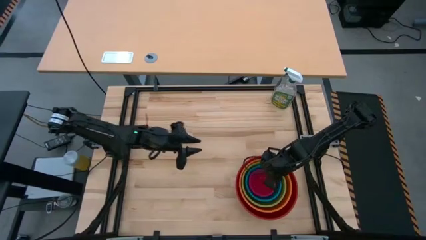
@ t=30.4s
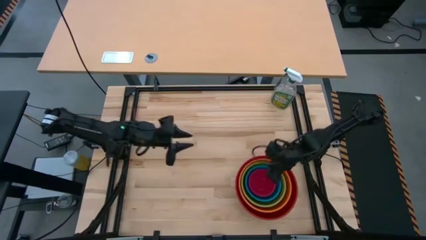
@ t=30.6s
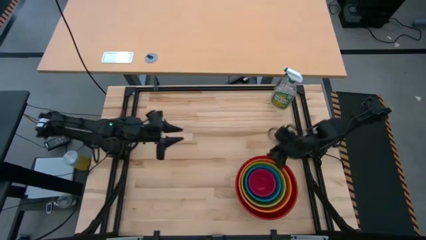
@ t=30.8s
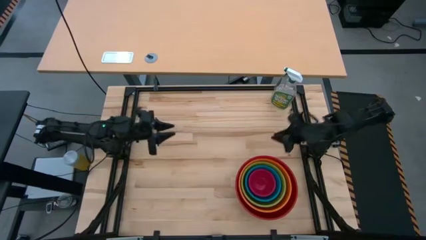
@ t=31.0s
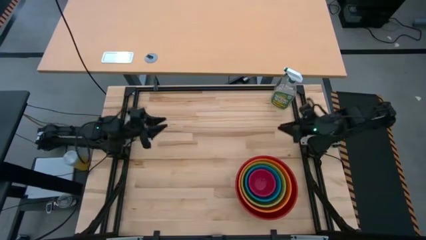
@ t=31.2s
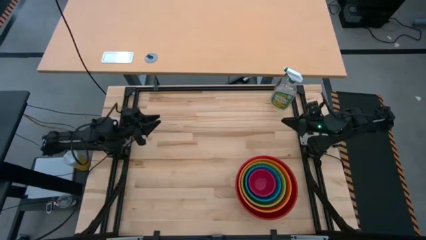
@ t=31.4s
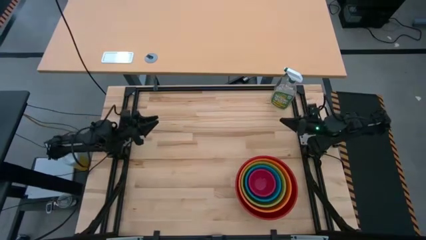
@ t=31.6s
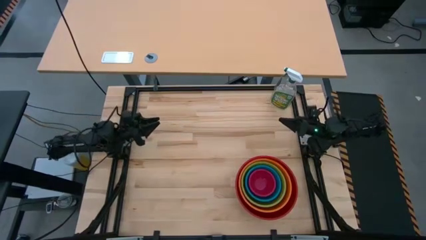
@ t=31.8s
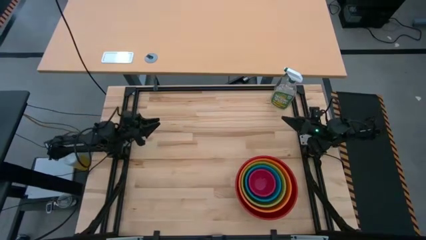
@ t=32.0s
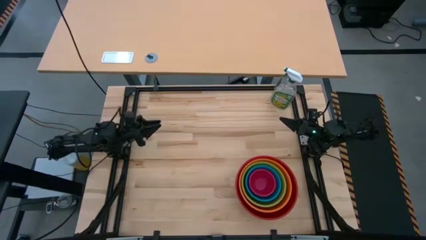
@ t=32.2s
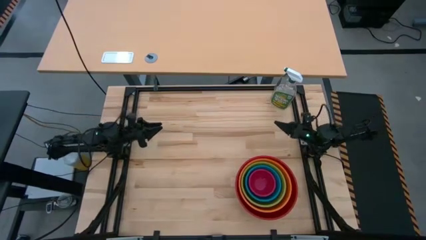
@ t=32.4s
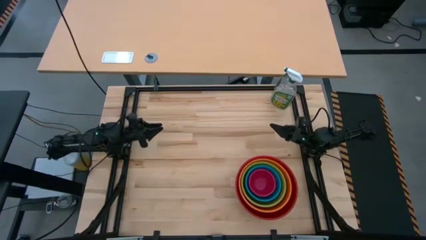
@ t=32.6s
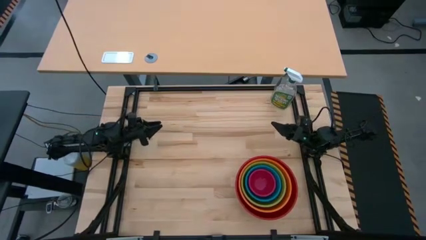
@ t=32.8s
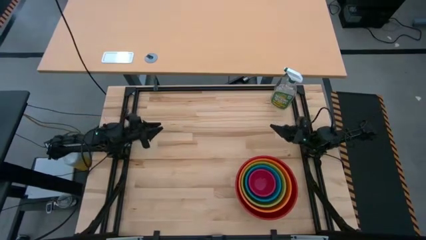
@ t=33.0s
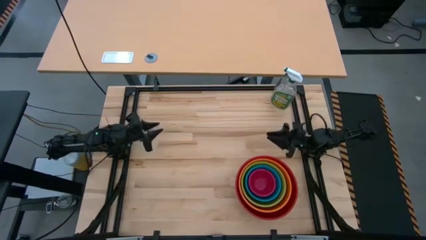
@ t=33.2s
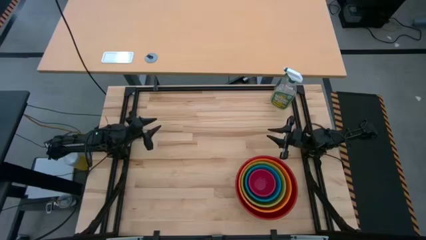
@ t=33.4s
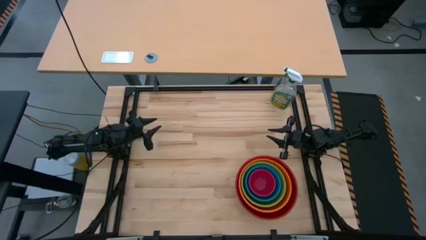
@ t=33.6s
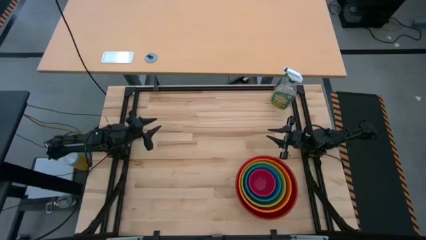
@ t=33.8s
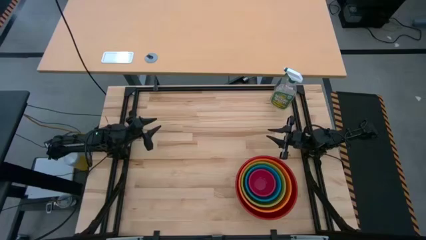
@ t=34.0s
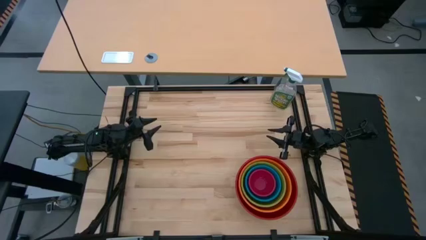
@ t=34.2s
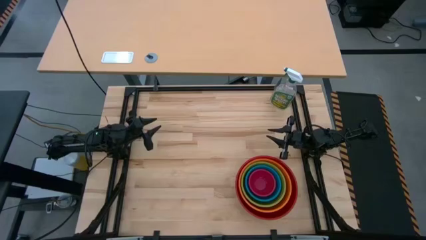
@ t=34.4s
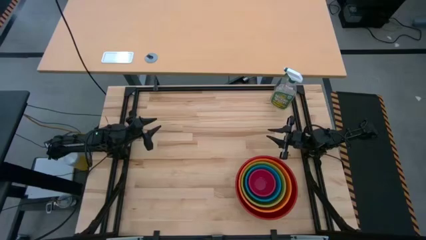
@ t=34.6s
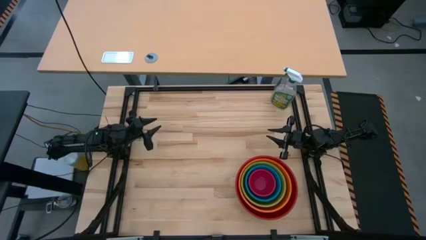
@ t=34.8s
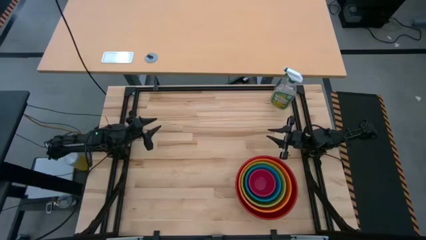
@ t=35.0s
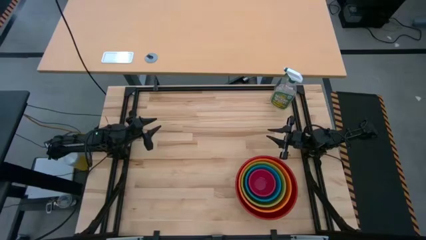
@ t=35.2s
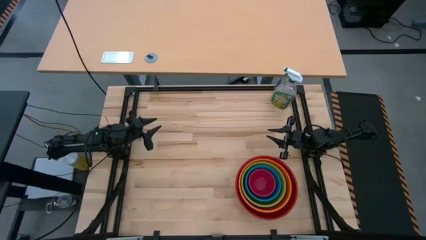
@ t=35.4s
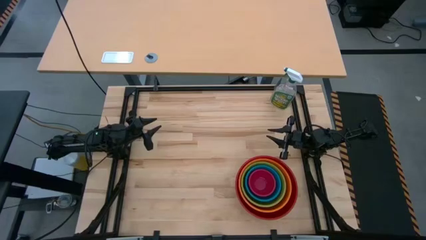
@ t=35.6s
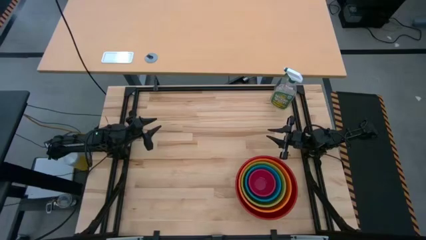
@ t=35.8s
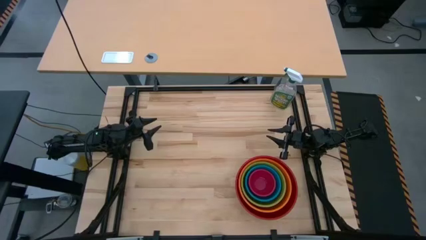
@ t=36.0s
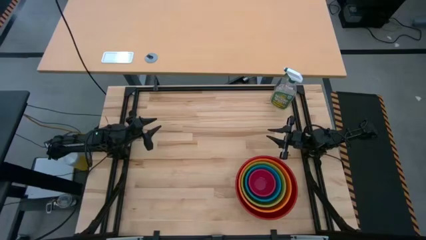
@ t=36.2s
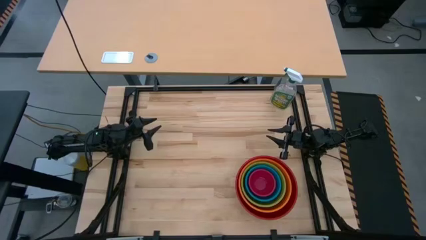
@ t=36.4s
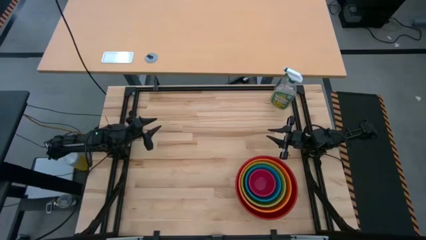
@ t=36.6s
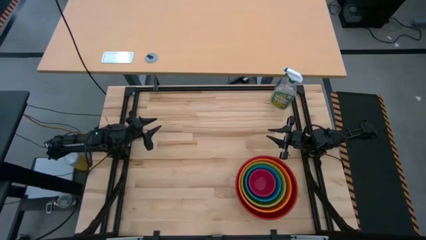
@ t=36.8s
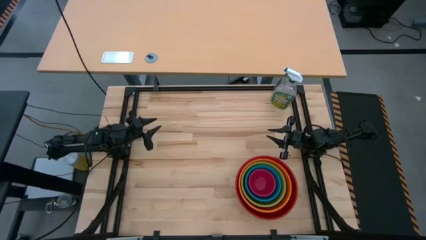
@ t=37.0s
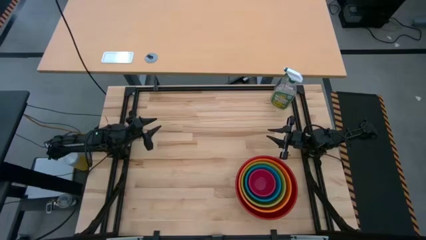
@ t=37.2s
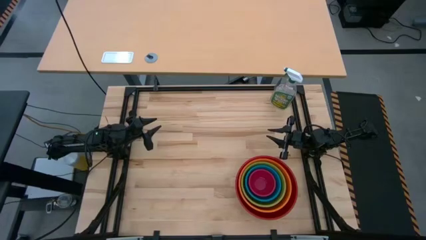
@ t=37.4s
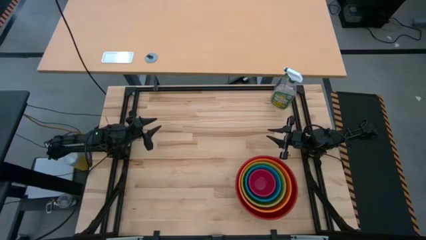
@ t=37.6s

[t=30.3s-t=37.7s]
Return to Home Position

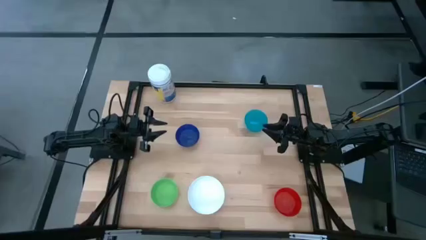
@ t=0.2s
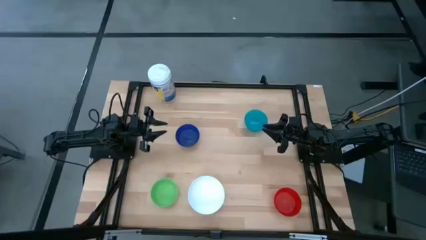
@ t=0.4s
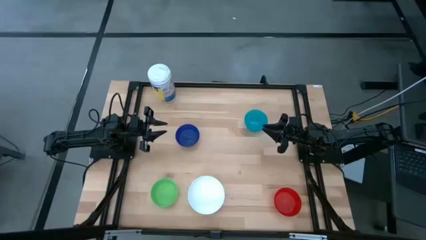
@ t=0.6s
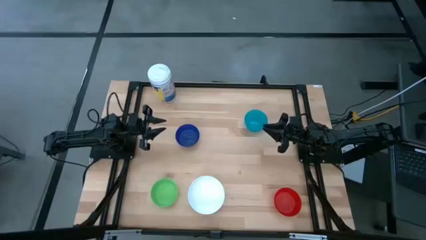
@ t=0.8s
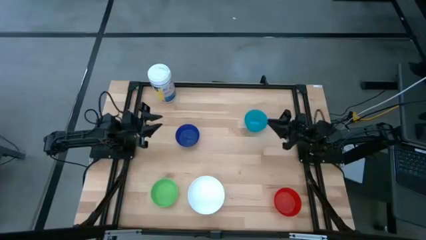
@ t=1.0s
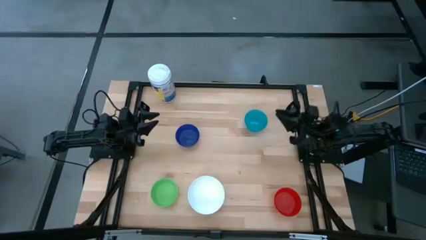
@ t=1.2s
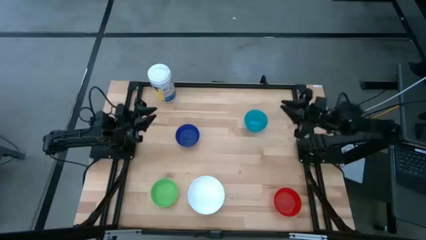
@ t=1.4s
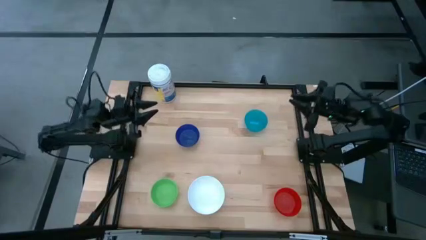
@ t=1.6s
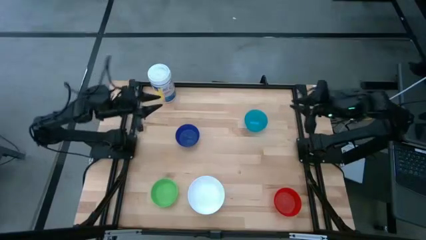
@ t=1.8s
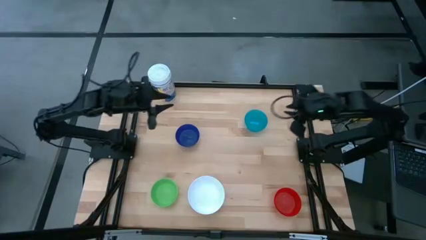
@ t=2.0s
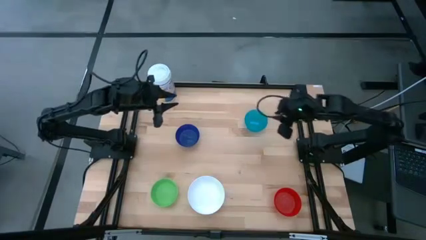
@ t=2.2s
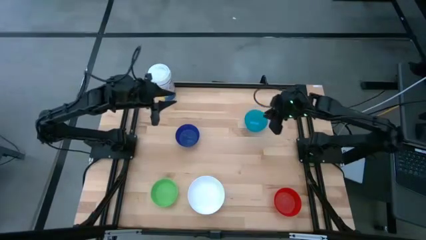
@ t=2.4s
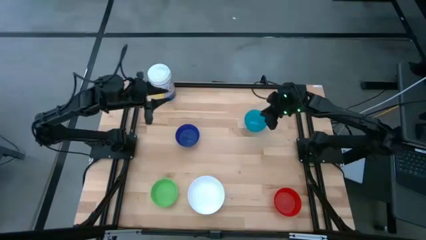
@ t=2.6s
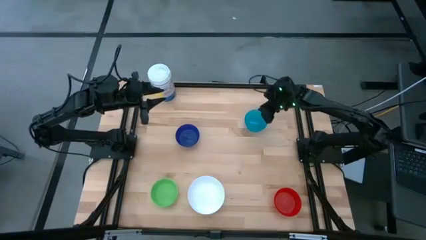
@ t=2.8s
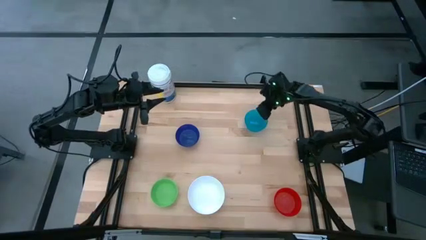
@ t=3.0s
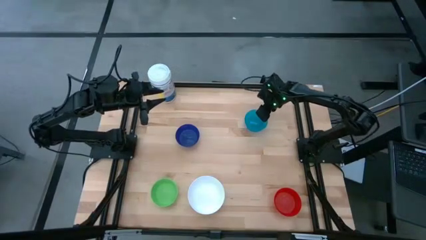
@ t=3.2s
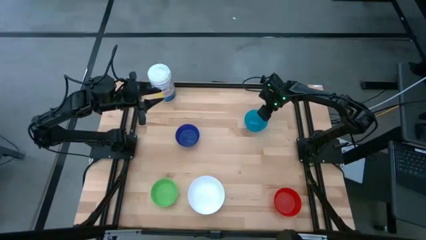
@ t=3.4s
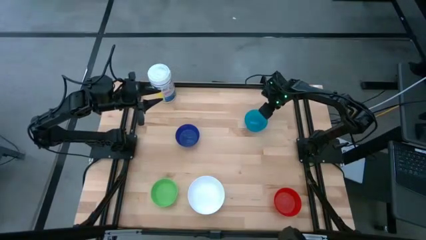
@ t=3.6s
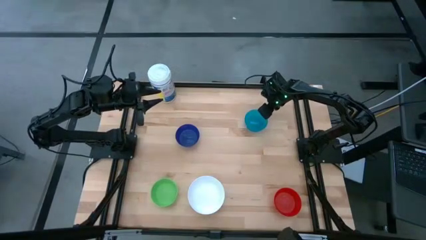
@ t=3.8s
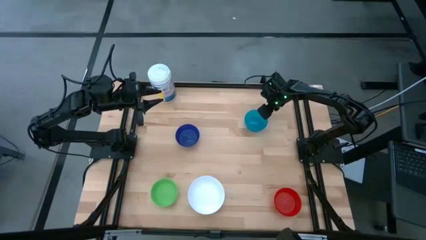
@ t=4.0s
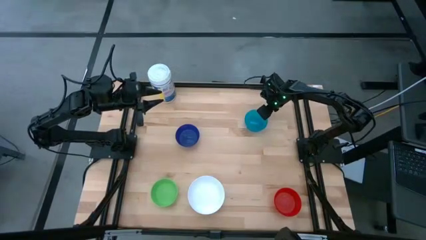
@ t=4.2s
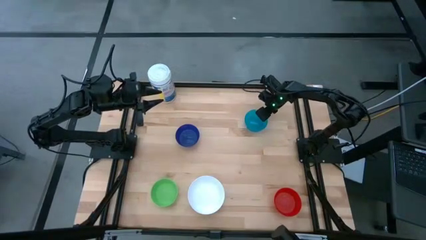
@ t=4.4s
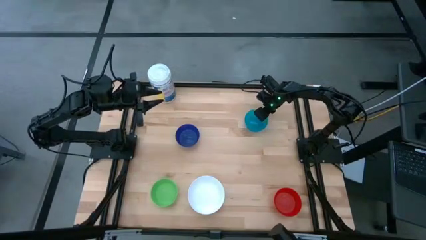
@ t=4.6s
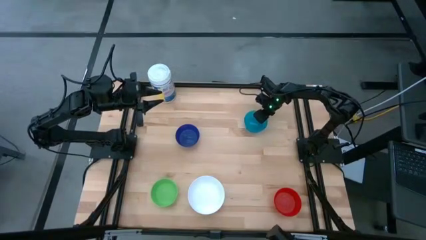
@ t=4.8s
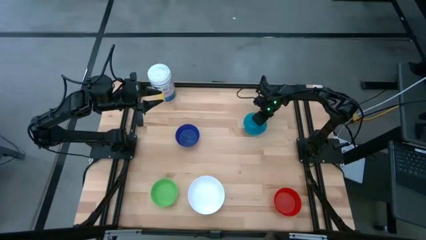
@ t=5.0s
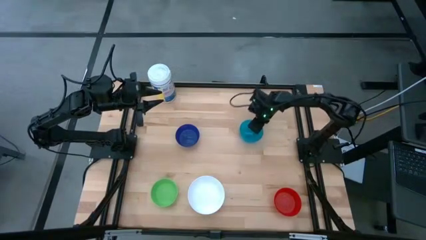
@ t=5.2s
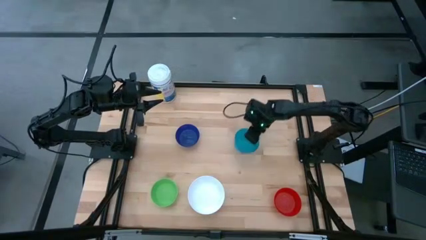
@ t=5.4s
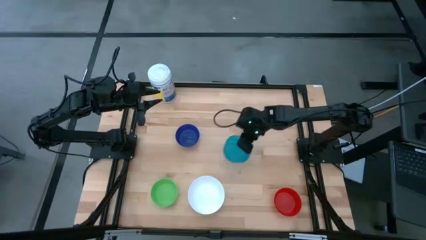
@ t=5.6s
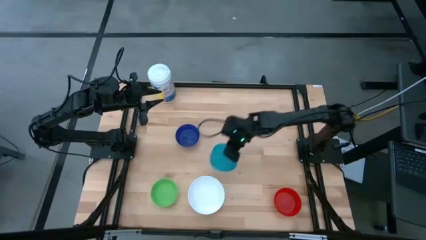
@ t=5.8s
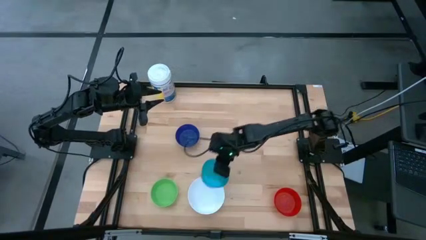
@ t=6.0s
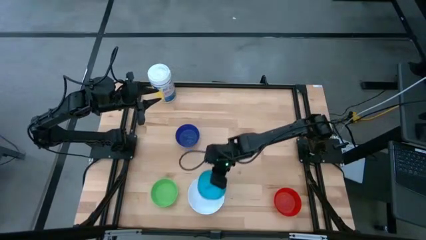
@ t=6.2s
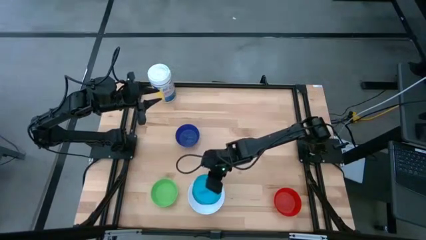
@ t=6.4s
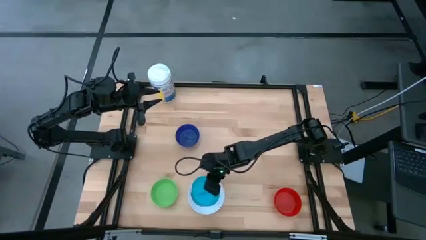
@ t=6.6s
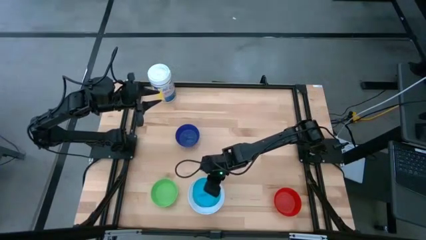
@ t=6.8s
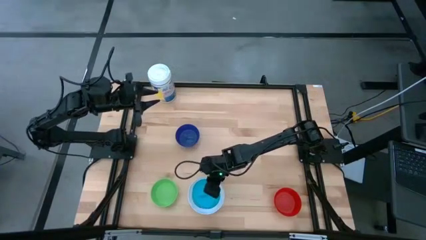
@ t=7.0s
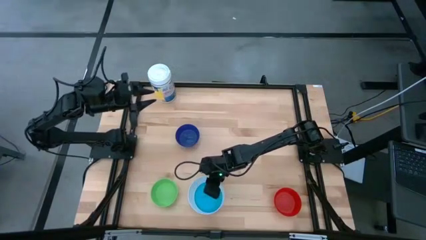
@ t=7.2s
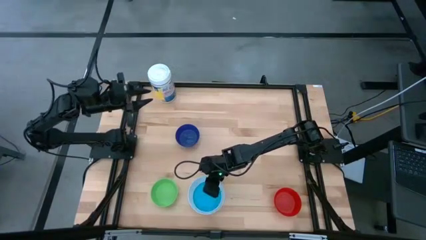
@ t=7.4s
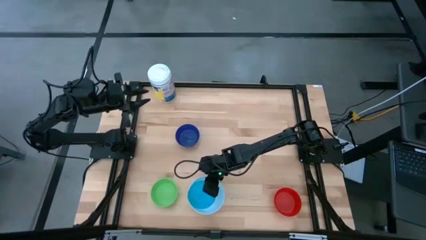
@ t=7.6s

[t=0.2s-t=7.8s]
Stack the light blue bowl on top of the white bowl
